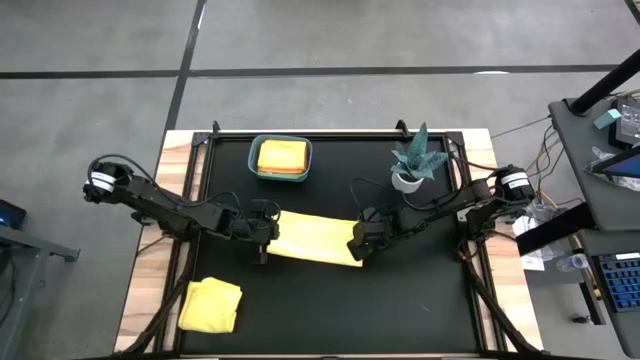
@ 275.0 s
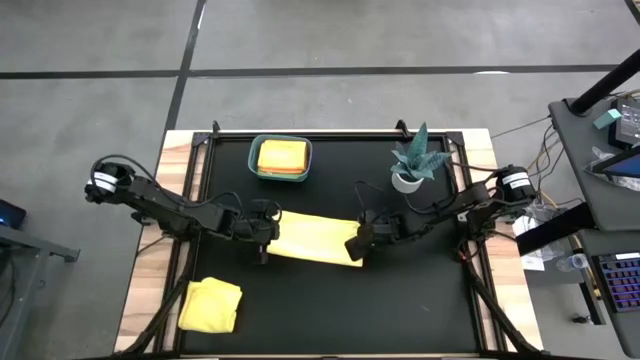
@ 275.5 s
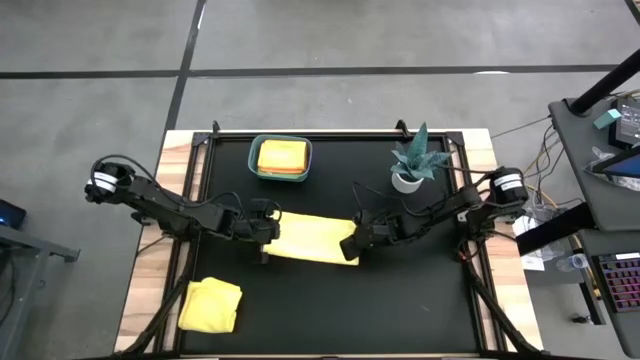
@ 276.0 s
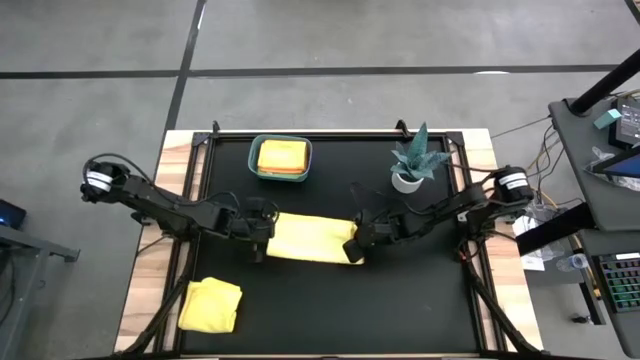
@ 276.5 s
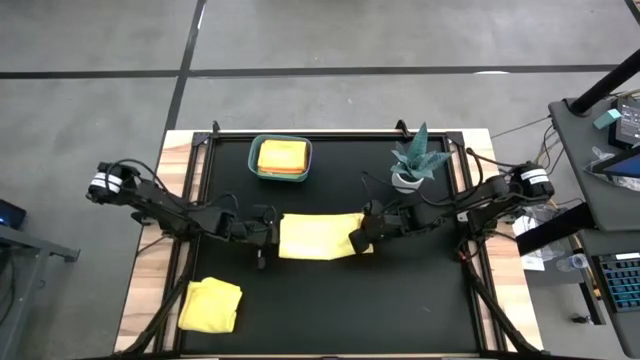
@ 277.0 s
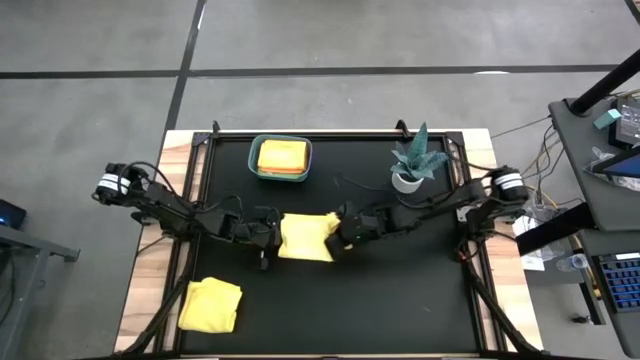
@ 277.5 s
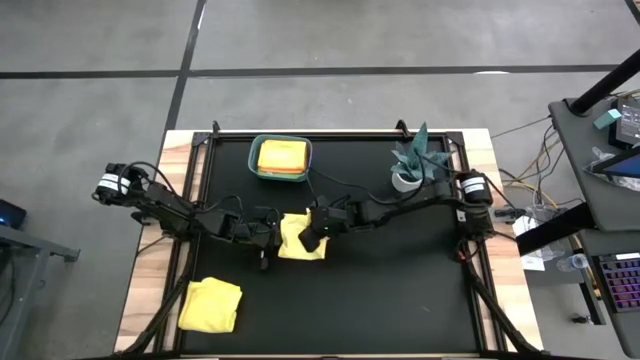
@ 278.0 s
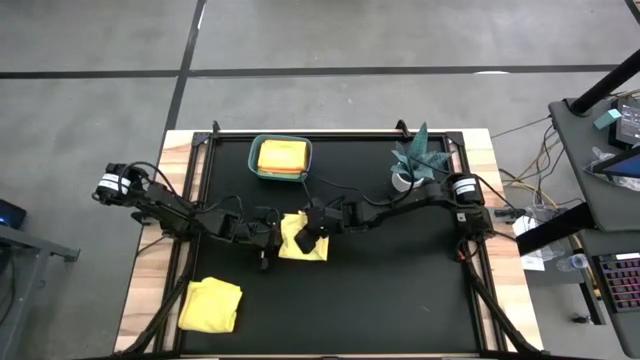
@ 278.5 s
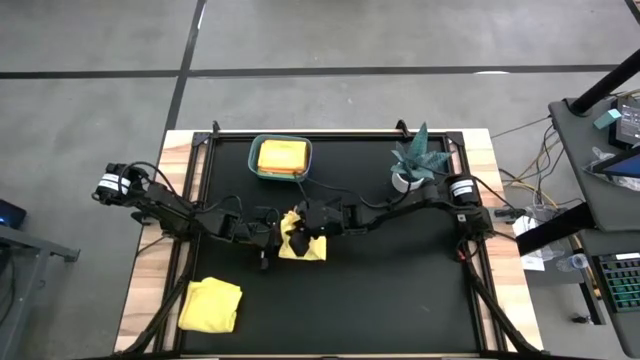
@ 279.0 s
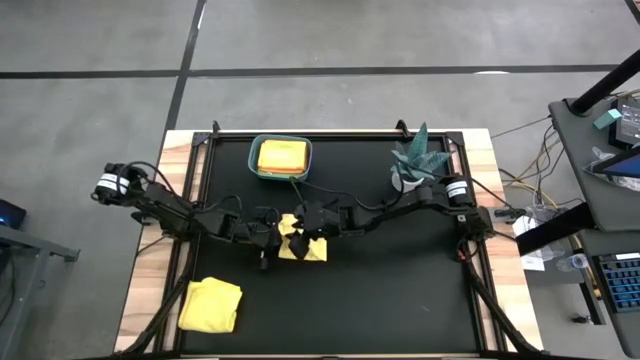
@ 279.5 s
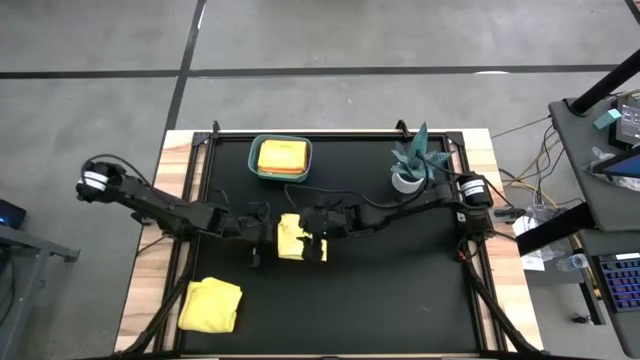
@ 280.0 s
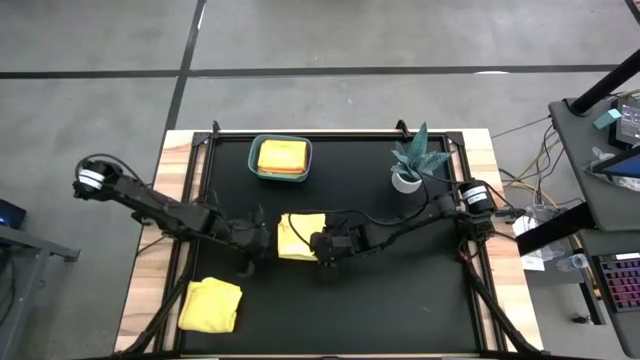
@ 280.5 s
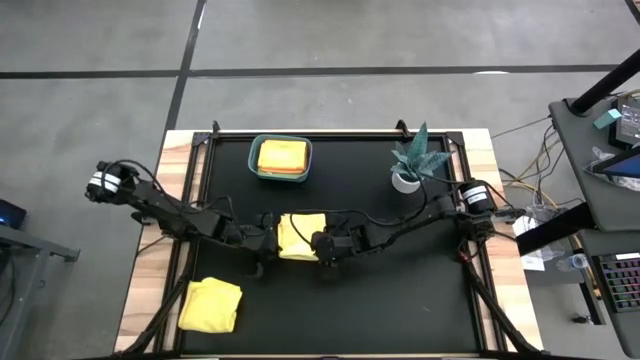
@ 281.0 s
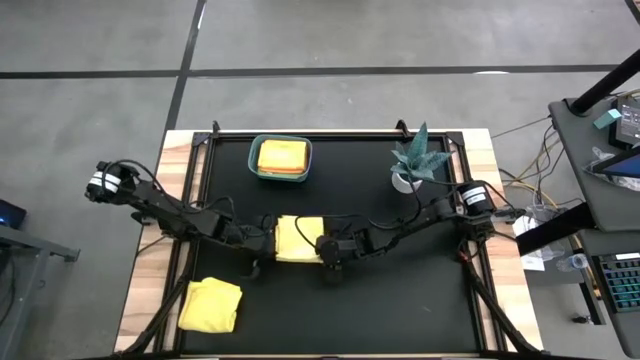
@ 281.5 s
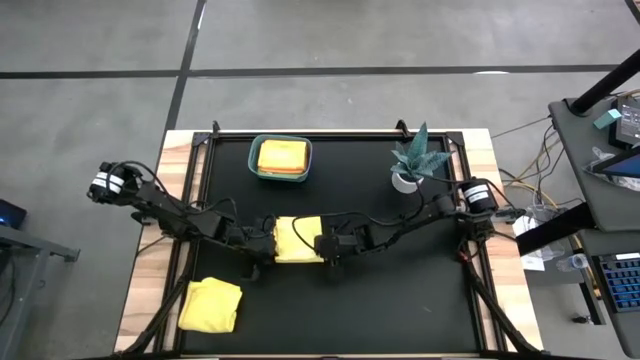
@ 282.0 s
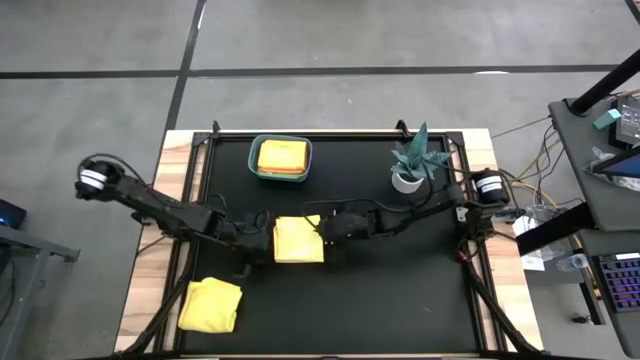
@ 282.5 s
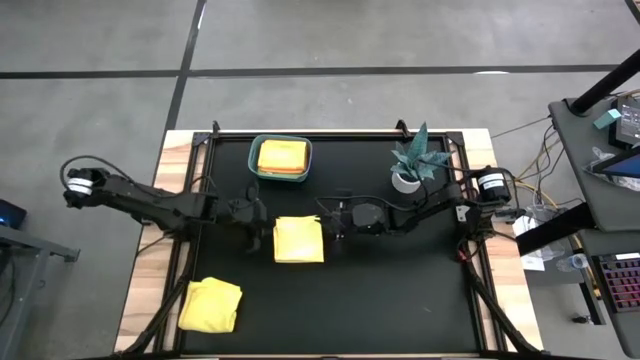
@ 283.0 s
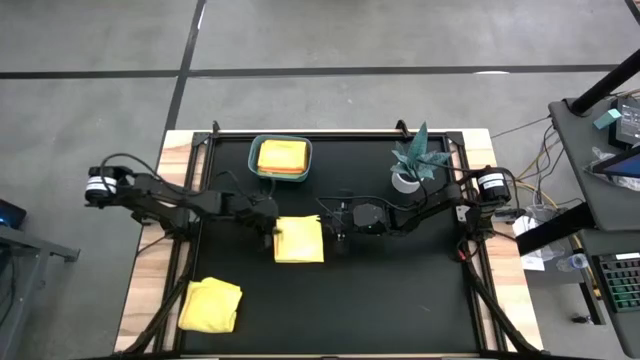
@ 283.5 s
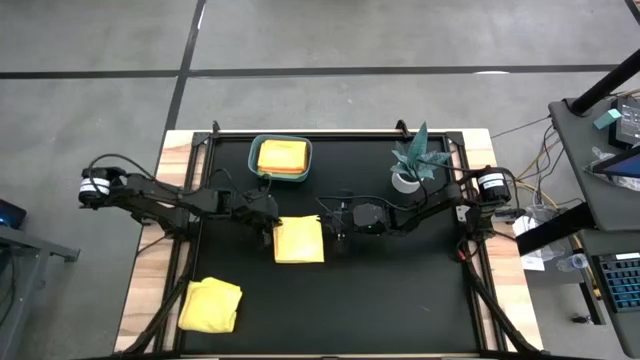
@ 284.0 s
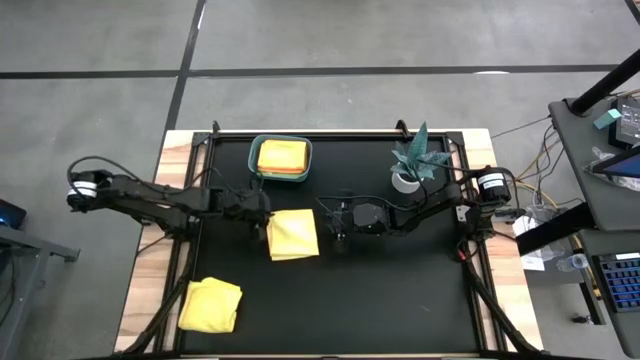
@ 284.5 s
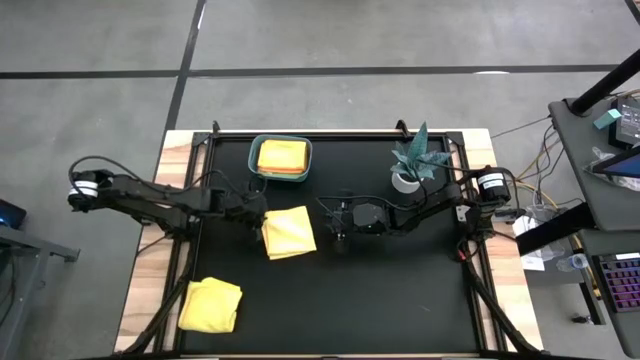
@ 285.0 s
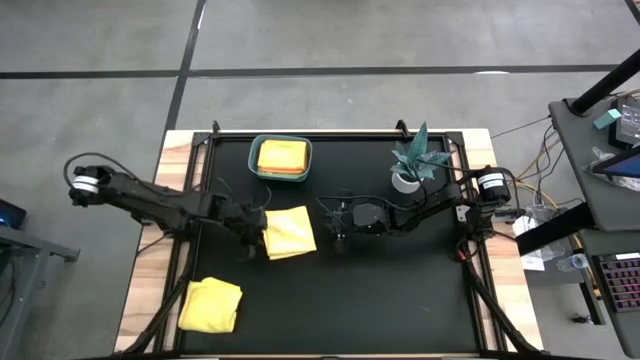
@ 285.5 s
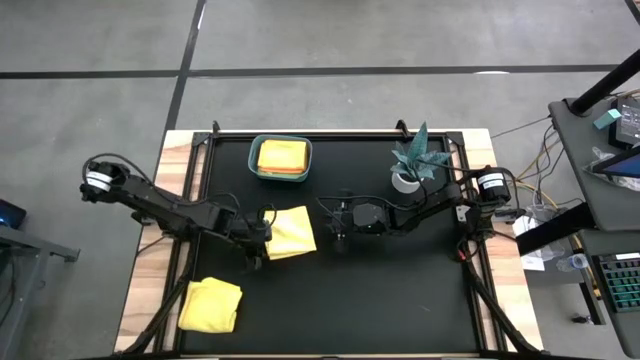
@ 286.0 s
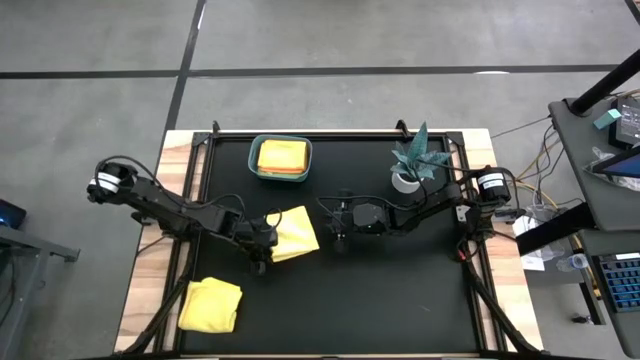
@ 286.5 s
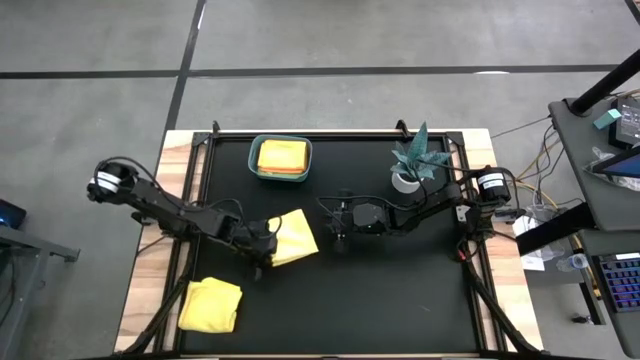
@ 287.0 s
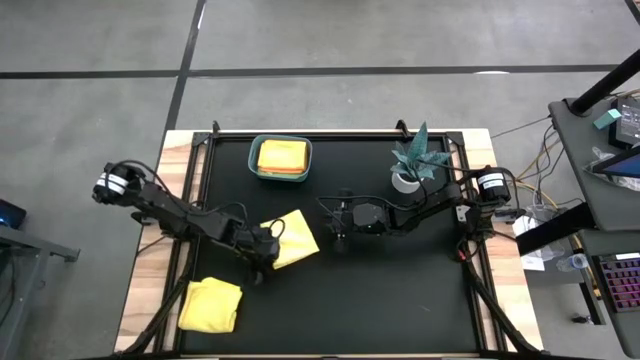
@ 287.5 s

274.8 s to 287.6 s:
Task: Fold microfiber towels
Fold the right yellow microfiber cloth

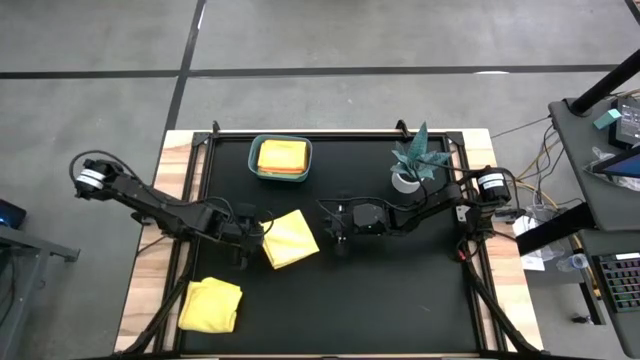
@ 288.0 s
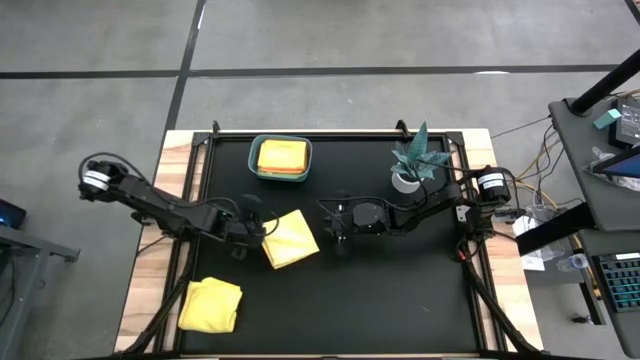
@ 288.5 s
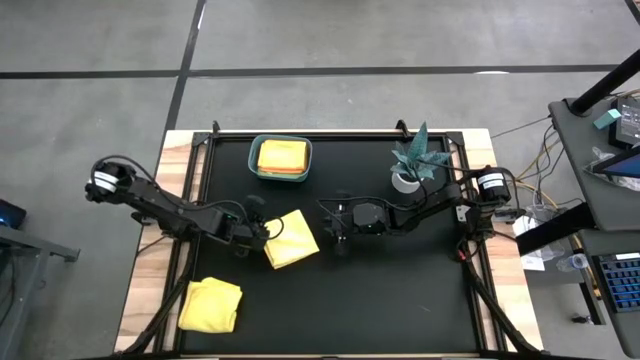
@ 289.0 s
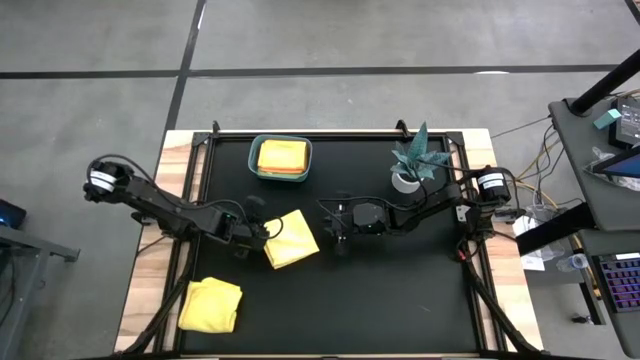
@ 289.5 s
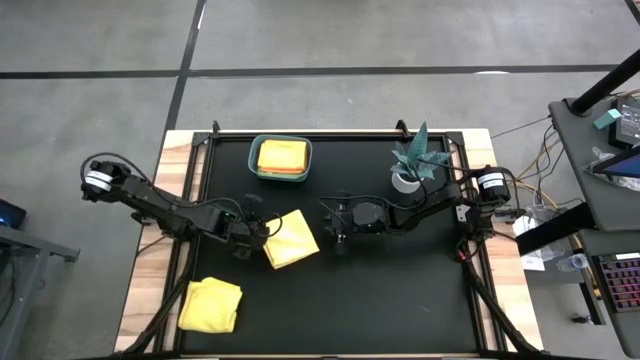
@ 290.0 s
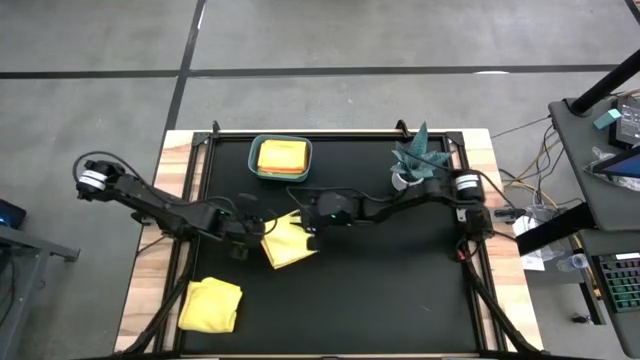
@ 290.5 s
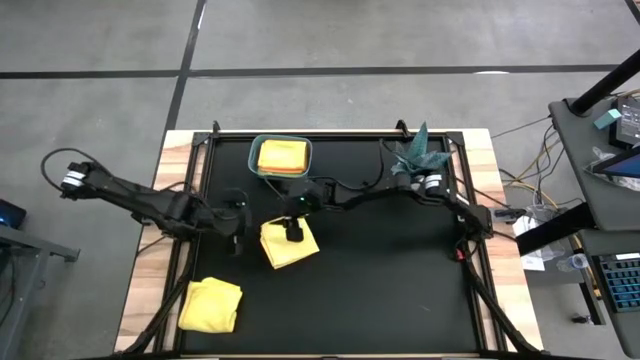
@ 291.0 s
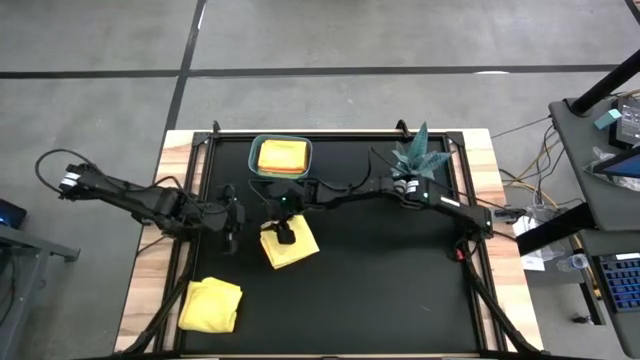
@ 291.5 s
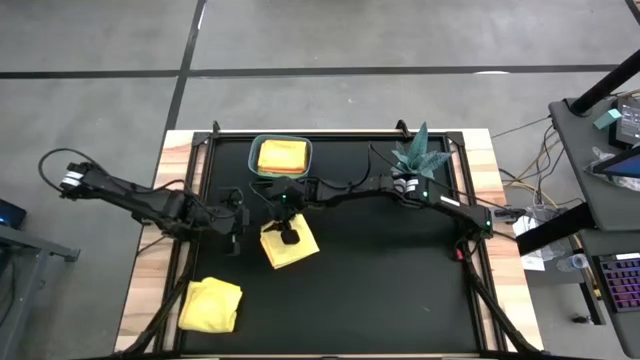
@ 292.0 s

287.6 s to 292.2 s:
Fold the right yellow microfiber cloth

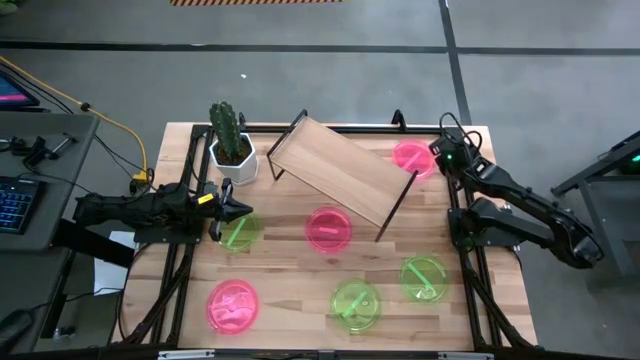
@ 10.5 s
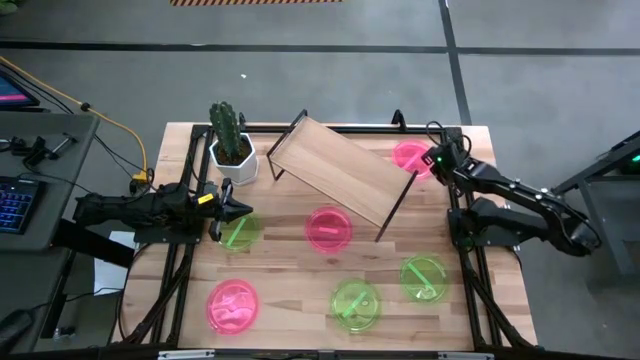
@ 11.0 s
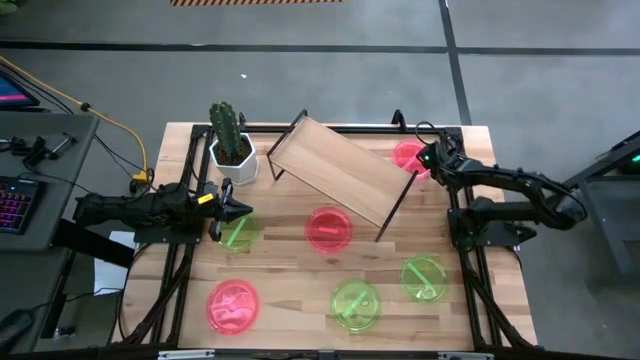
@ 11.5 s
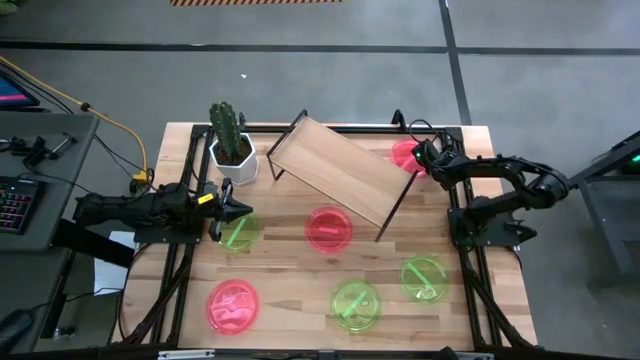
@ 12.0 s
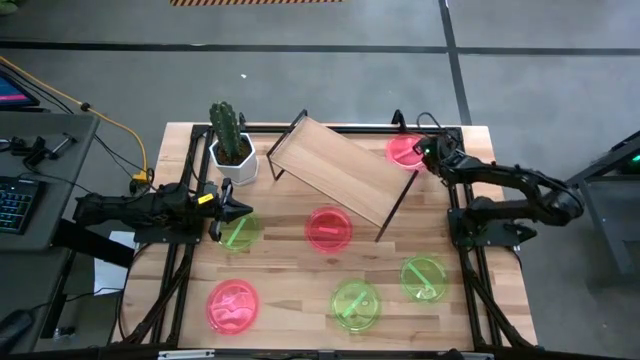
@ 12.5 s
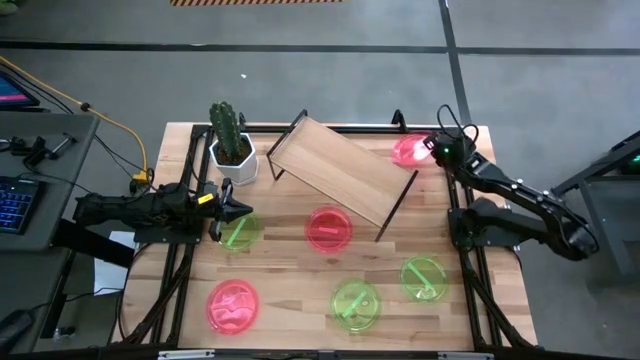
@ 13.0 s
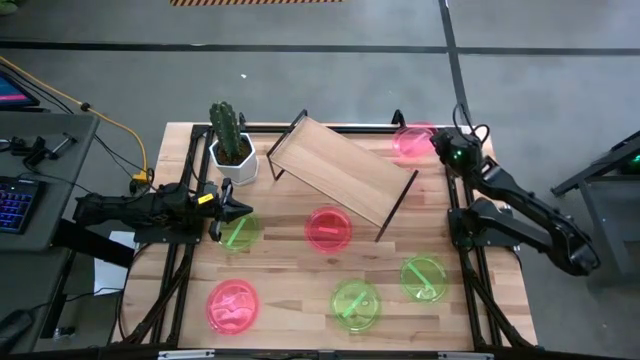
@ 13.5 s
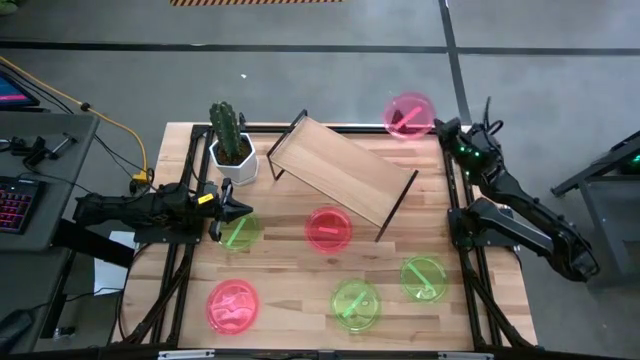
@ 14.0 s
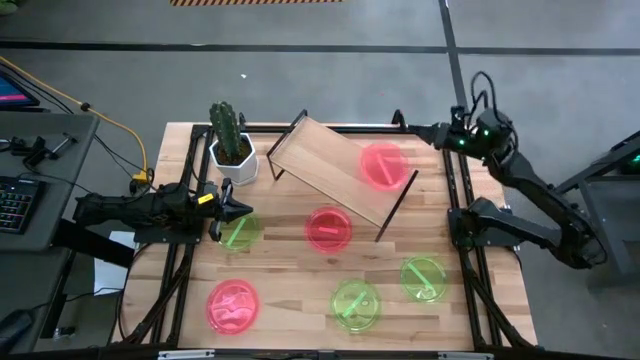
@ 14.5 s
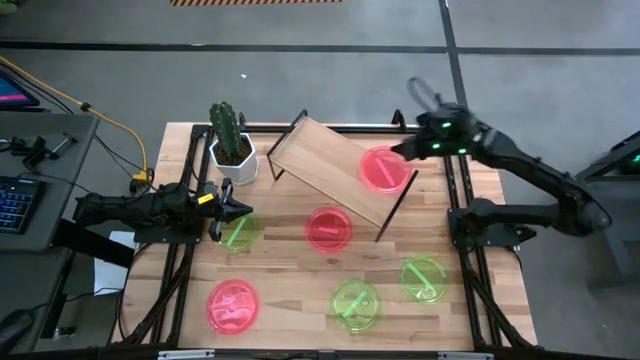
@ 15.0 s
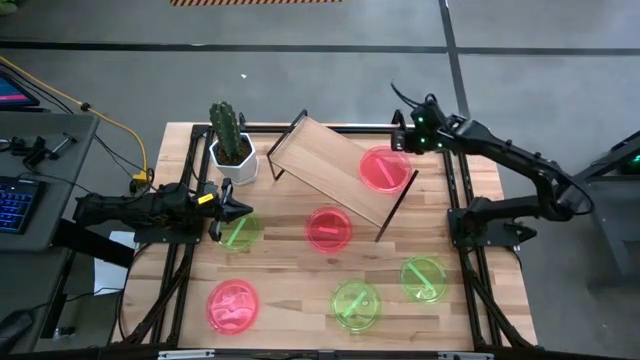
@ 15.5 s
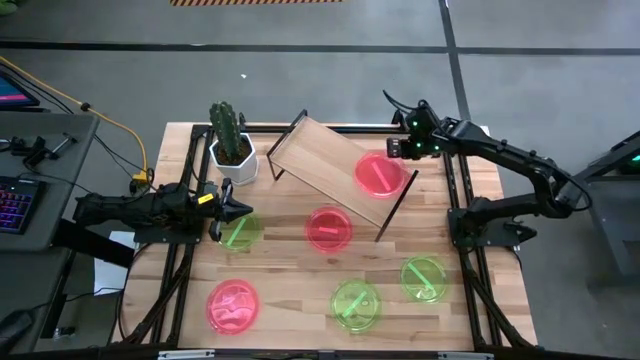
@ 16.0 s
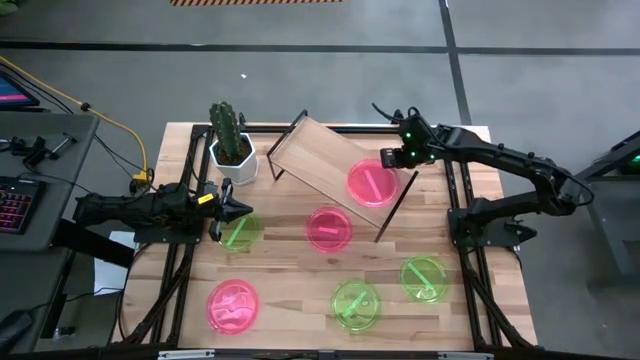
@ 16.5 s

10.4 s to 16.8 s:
Task: Place and stack plates onto a shelf
Put the top right light pink plate on the shelf
